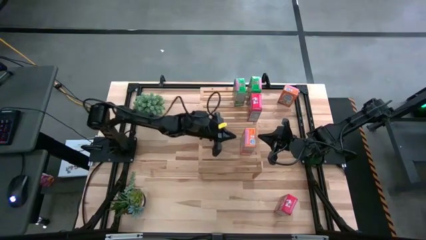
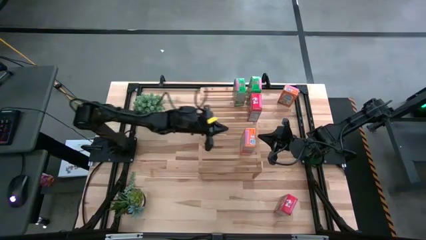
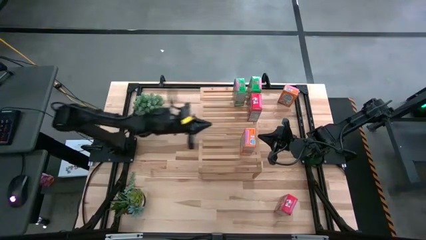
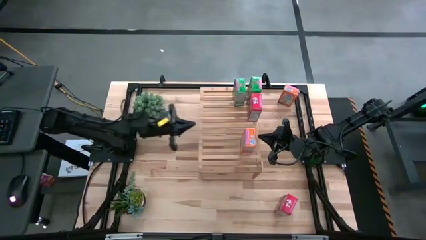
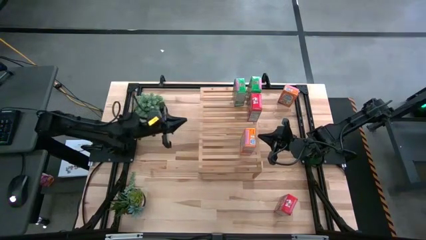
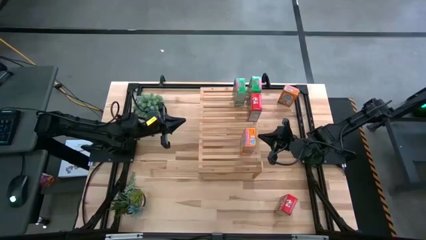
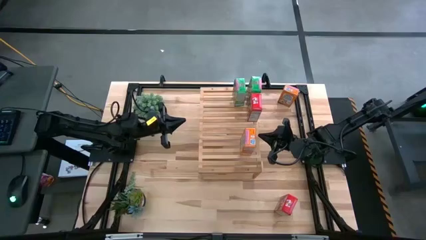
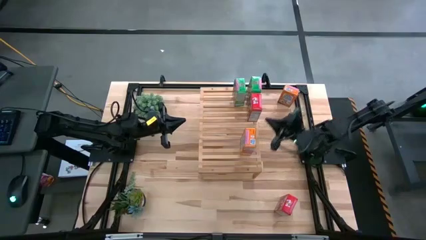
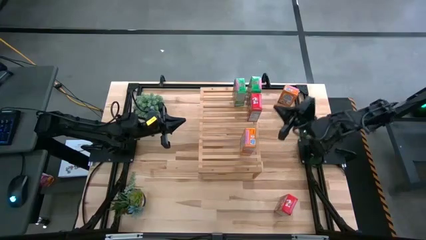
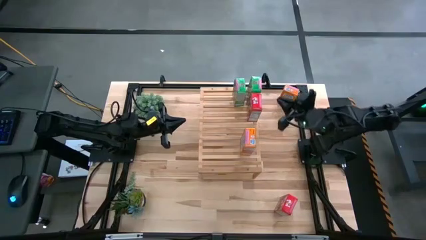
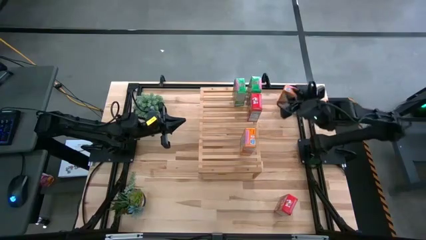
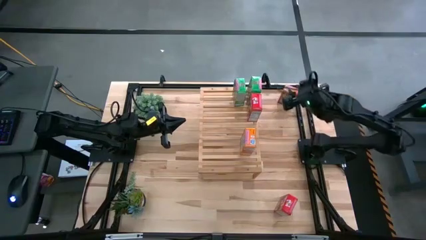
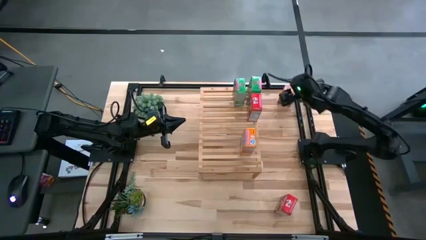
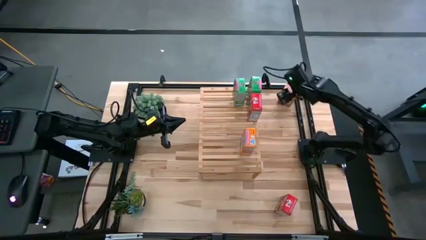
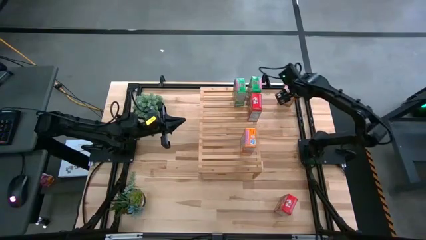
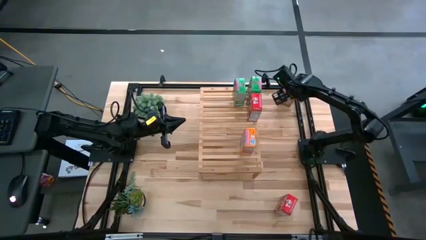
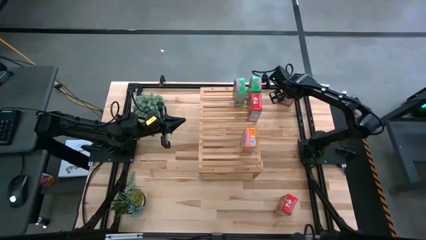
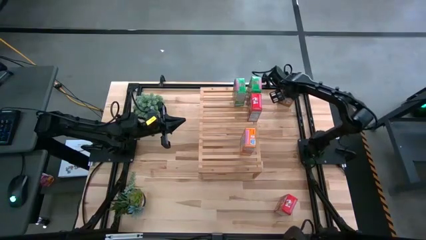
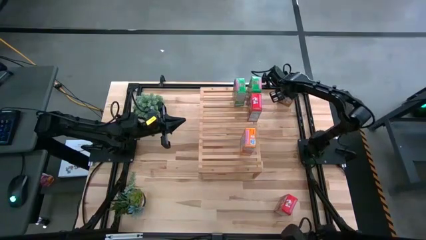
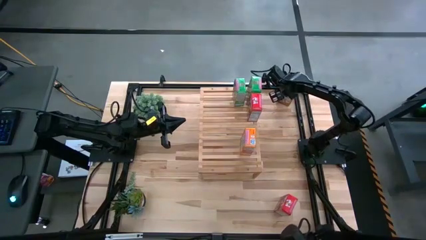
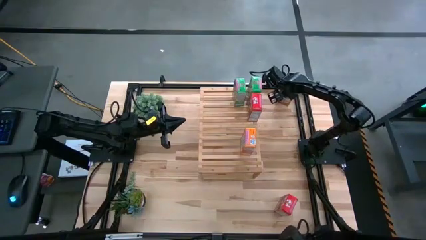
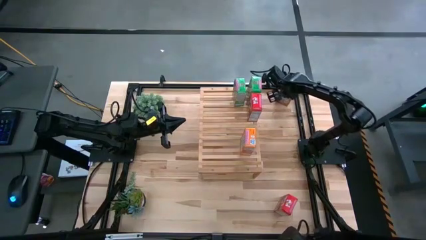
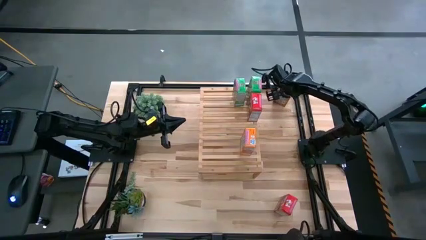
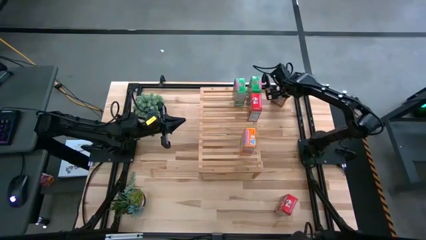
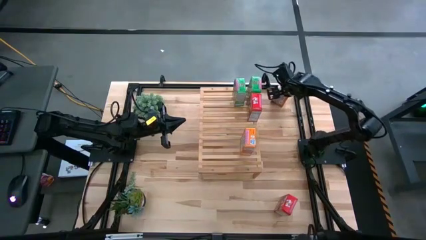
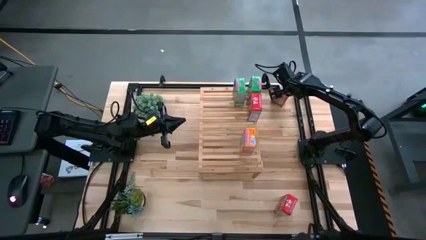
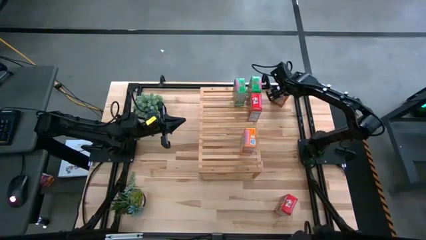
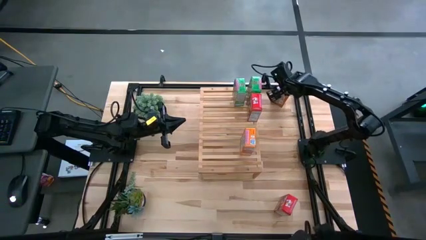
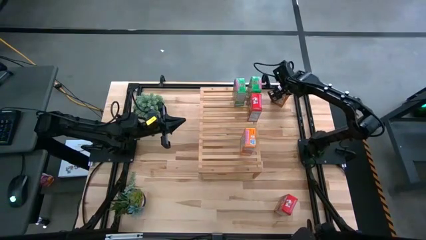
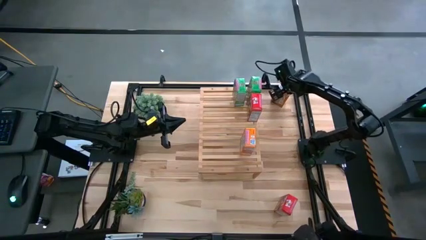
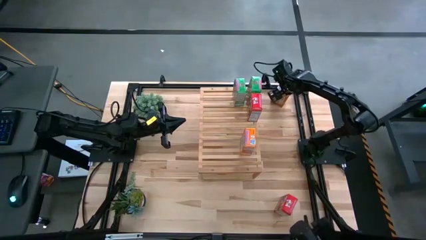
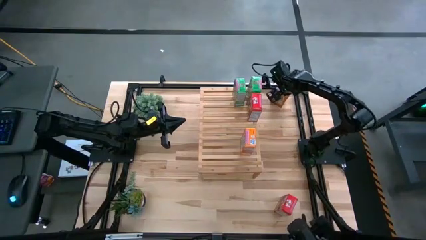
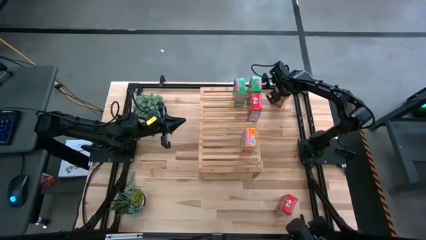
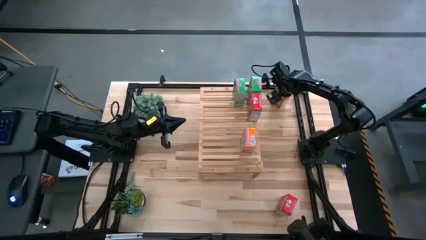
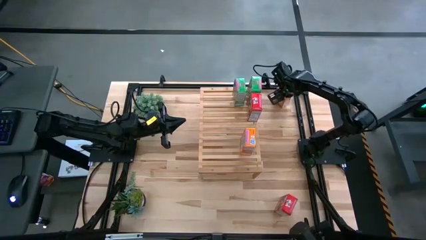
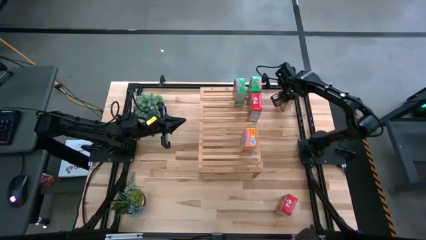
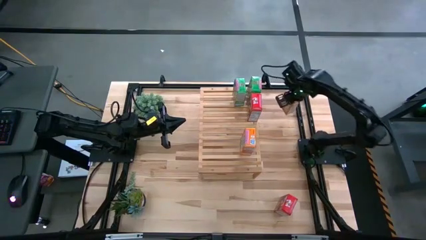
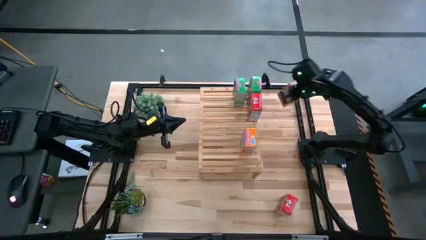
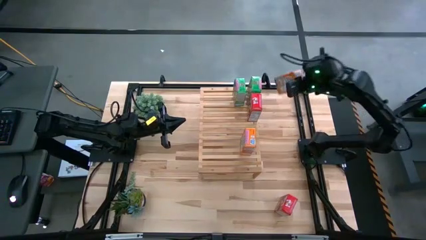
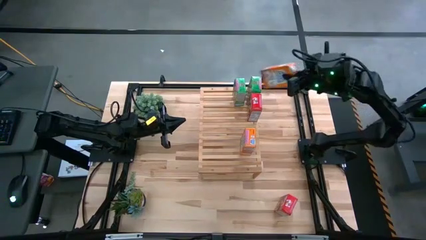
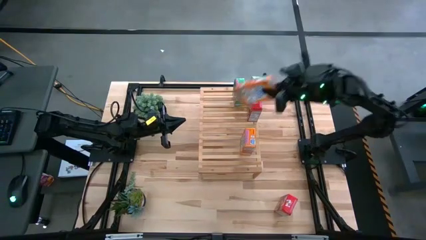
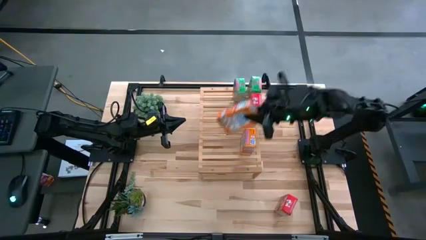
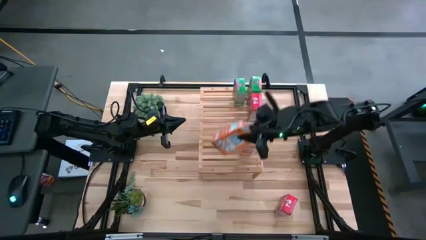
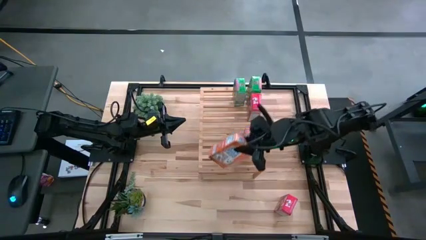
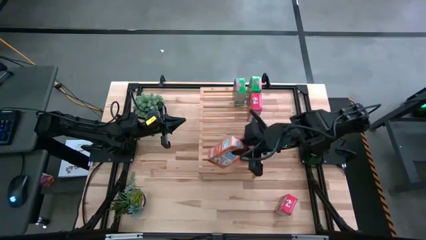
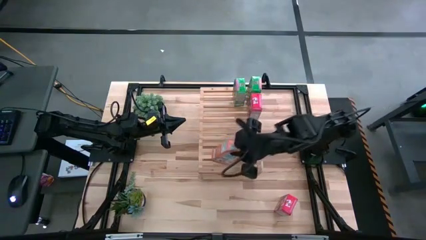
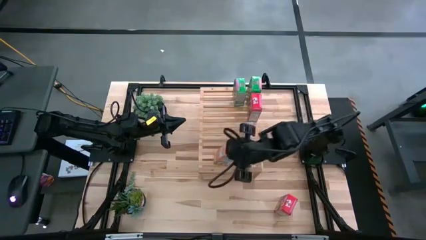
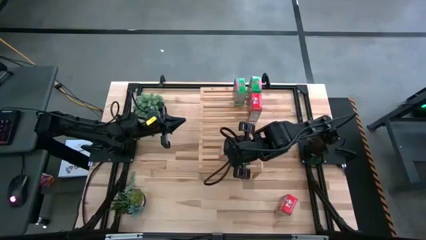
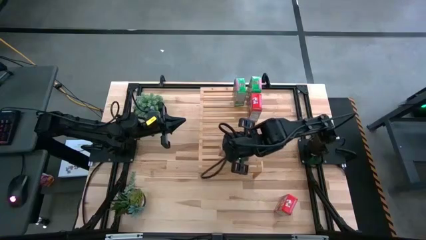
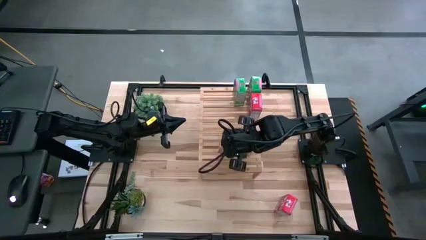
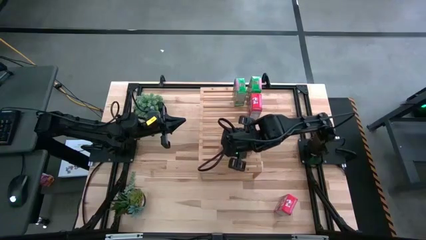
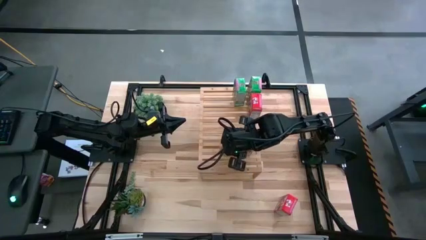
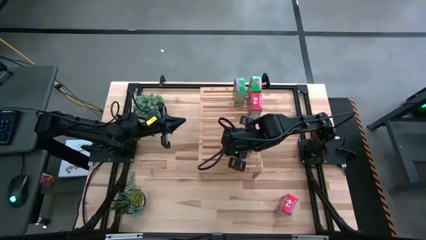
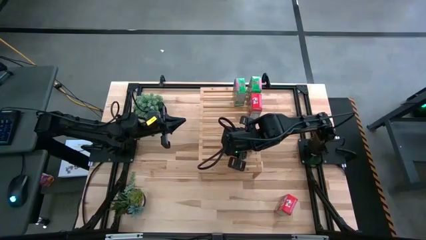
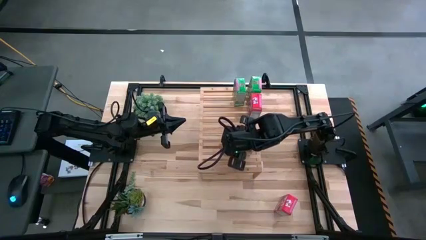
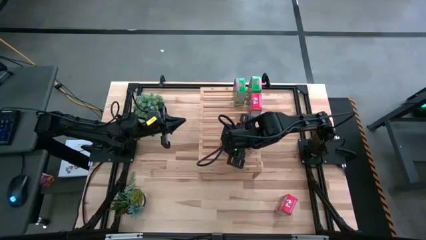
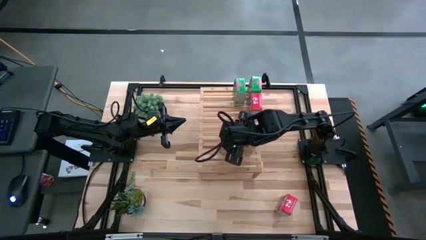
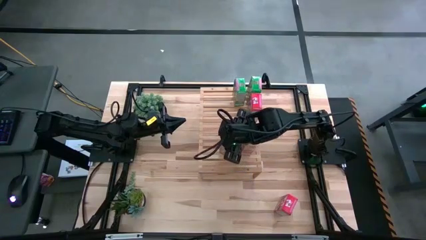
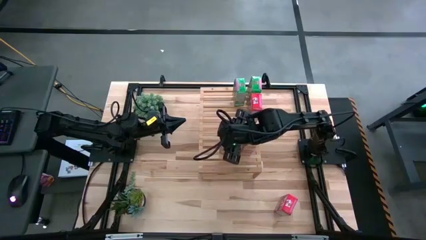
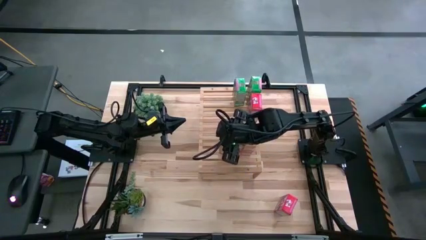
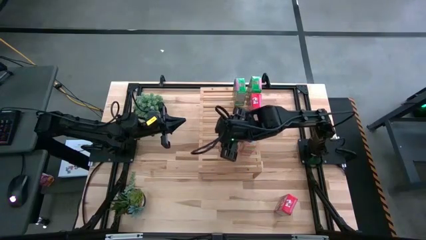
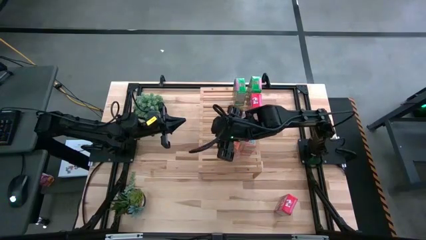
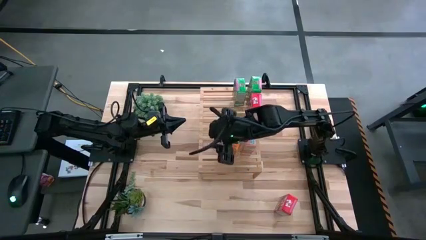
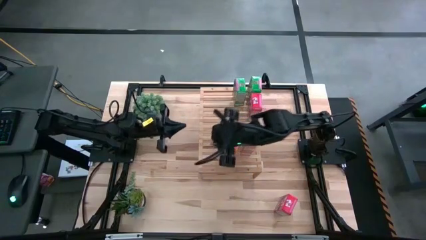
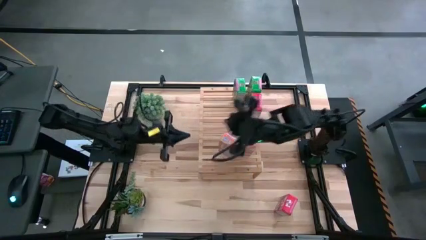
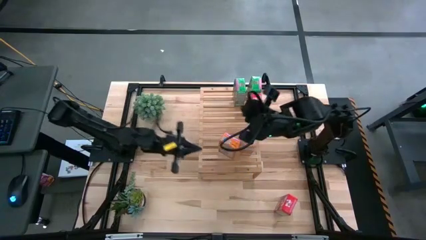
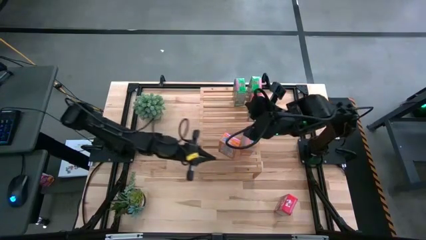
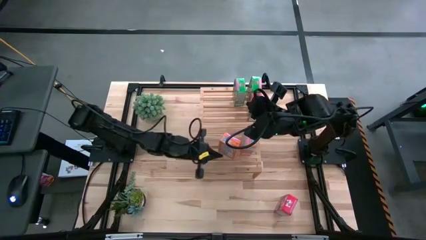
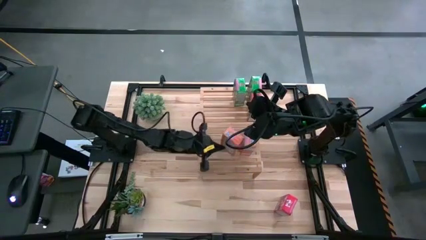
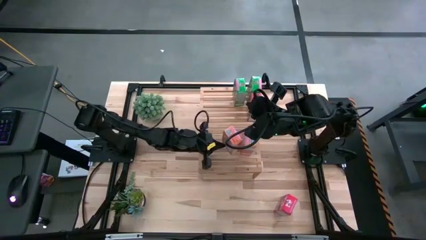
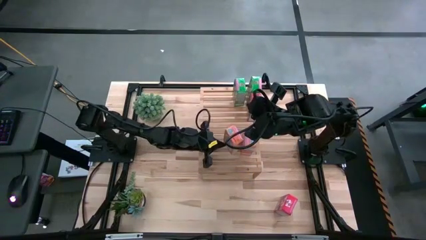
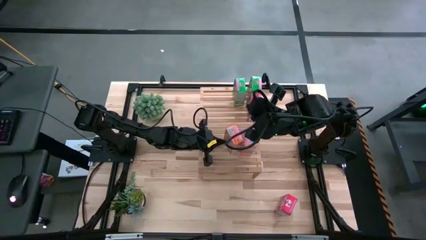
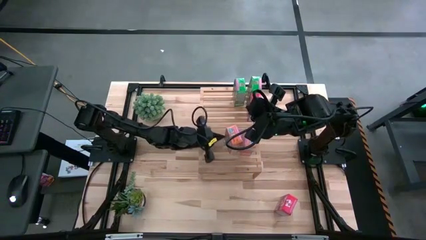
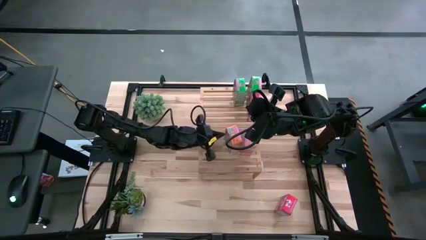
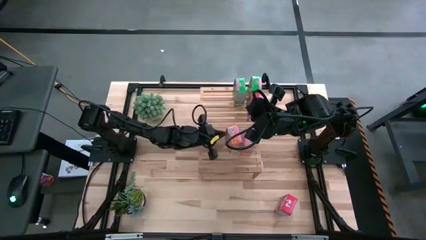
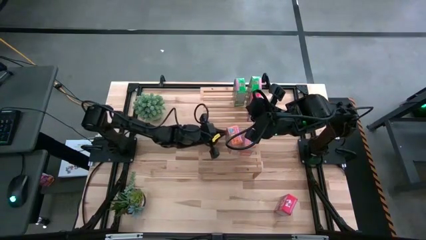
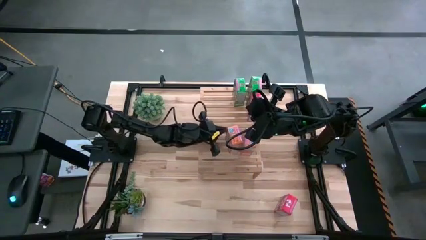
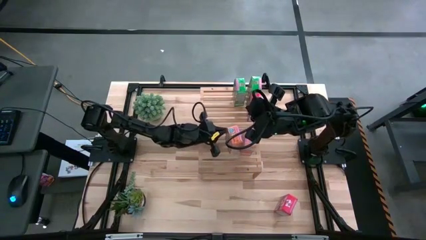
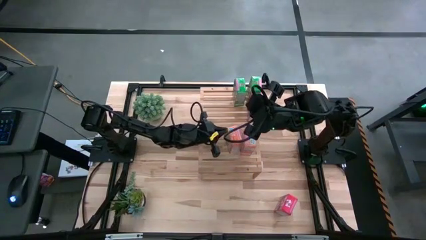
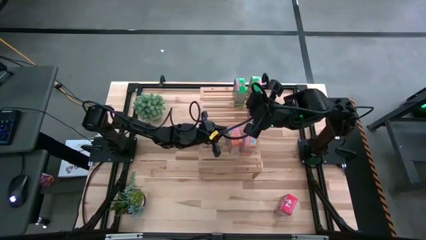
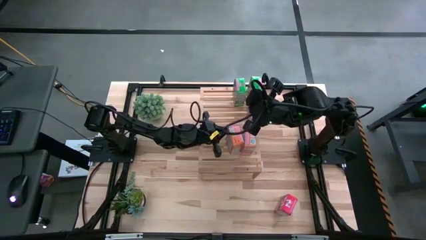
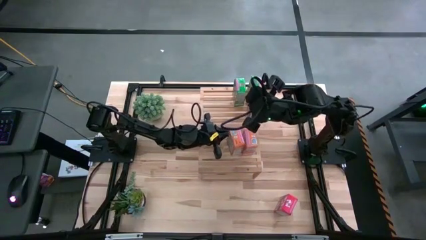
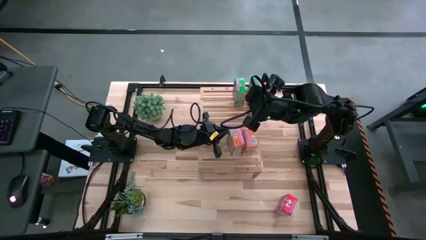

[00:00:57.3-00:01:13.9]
Task: Stack cereal on shelf
Put the orange cereal box on the shelf aligned with the other orange cereal box
